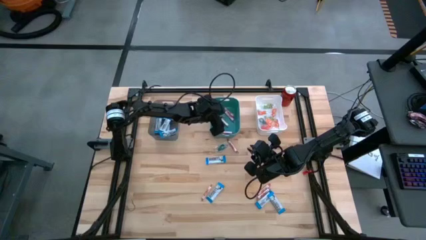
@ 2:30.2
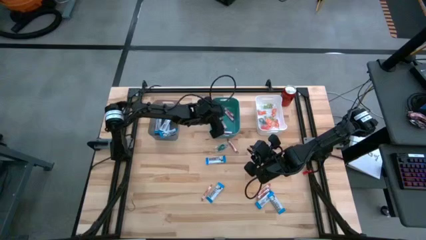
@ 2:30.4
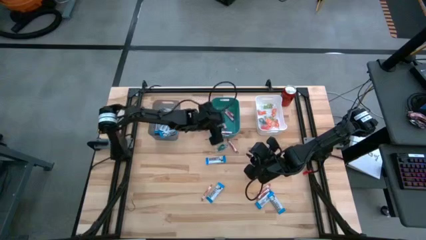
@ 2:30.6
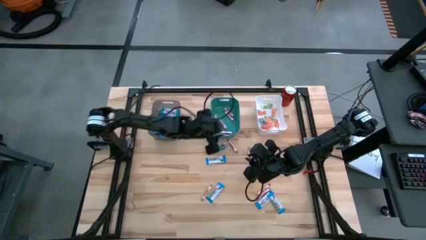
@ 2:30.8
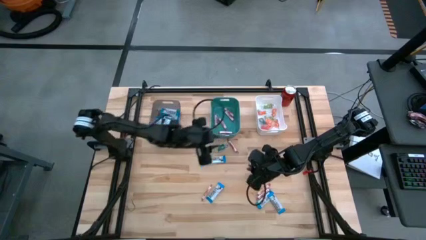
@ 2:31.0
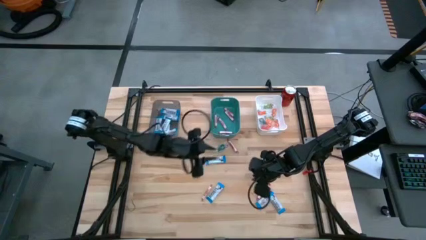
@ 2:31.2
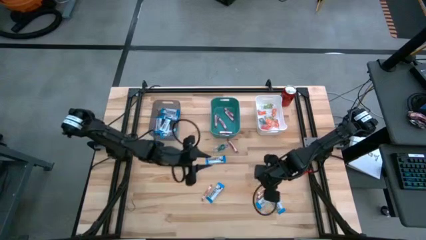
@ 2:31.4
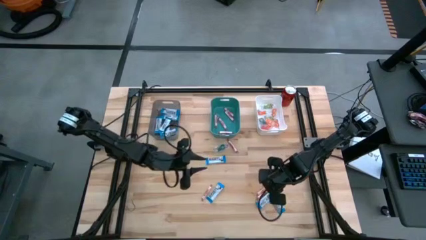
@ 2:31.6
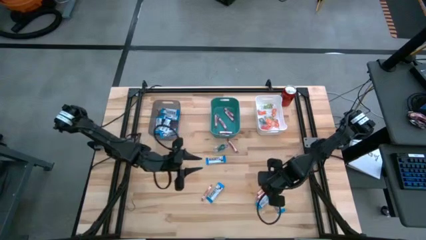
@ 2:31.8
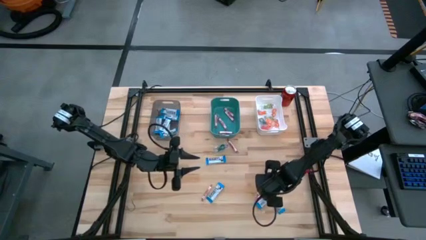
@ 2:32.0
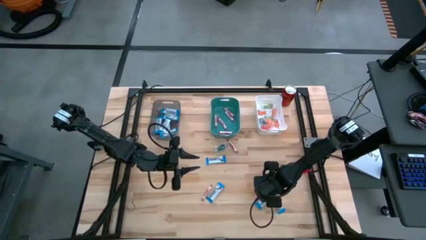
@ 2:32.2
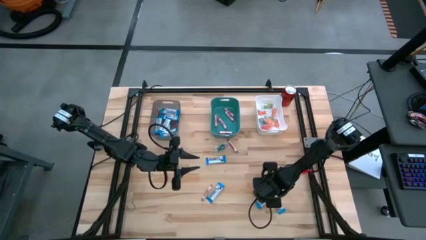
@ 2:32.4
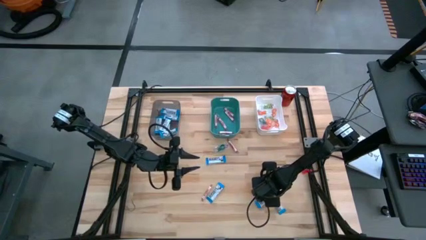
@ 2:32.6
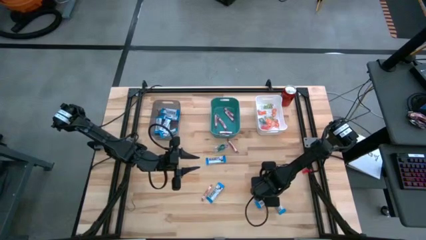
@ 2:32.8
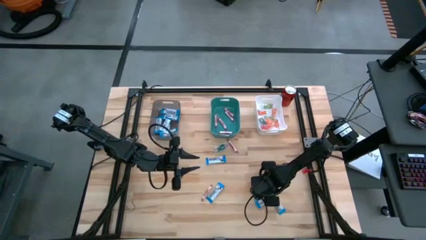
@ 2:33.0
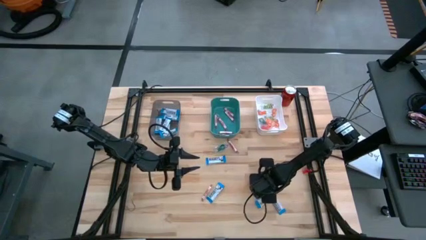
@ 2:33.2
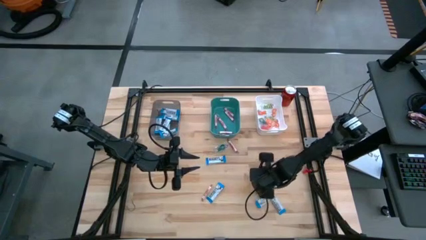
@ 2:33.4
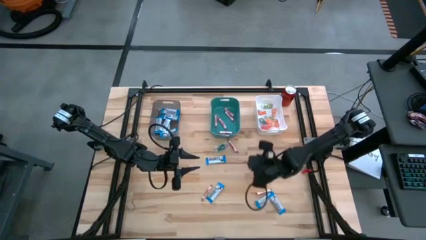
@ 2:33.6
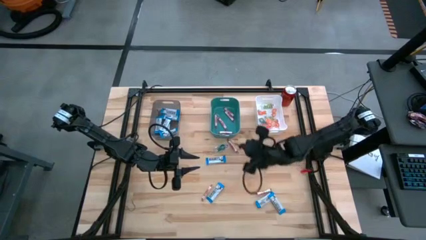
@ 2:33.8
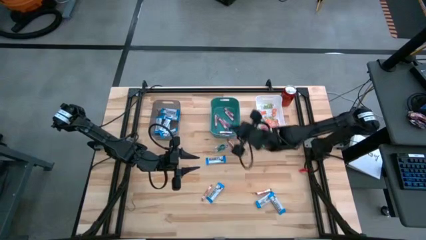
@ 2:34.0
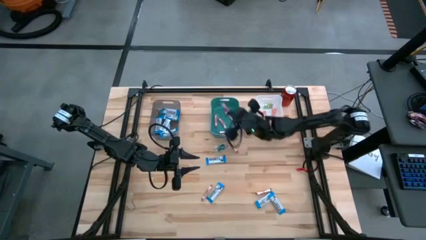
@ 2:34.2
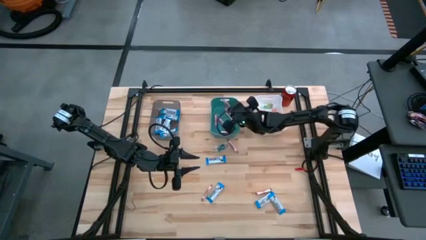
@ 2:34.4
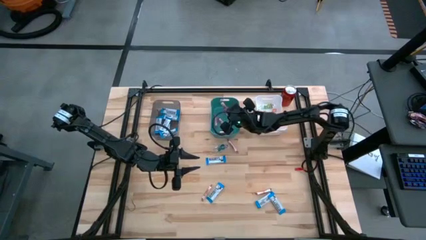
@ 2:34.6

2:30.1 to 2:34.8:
Task: Sort candy
Put the red candy into the blue bin

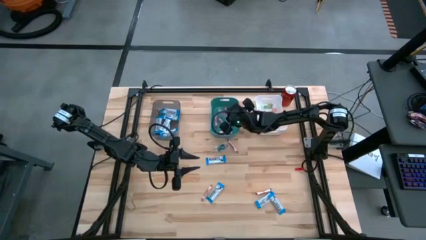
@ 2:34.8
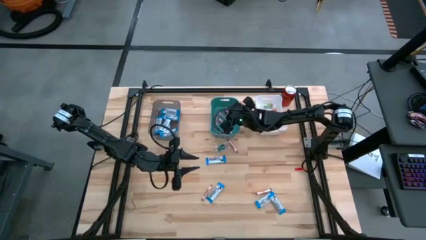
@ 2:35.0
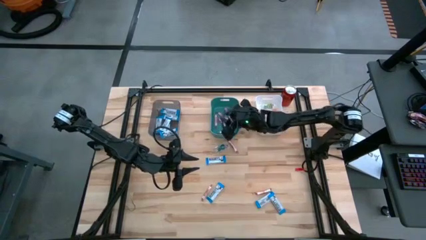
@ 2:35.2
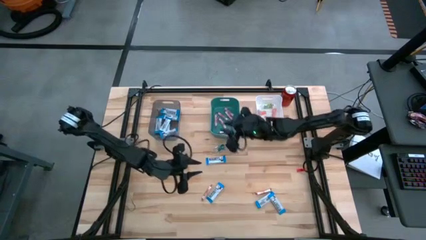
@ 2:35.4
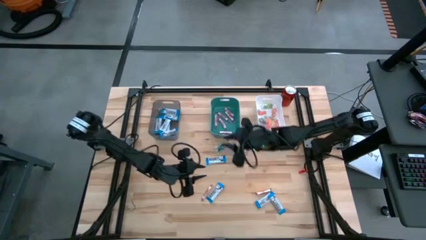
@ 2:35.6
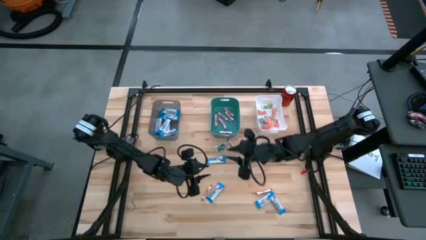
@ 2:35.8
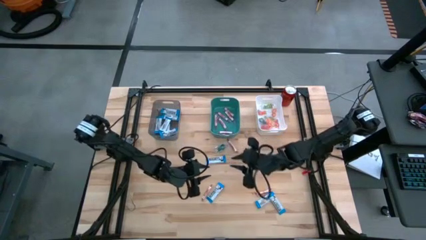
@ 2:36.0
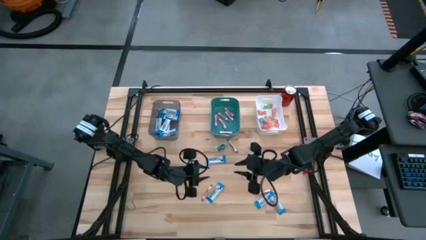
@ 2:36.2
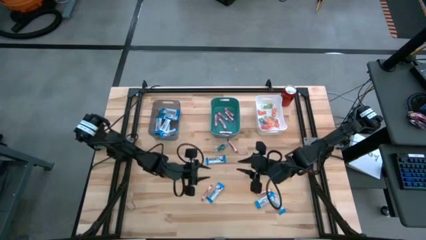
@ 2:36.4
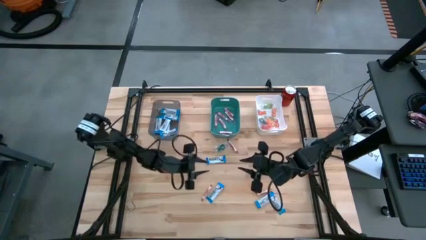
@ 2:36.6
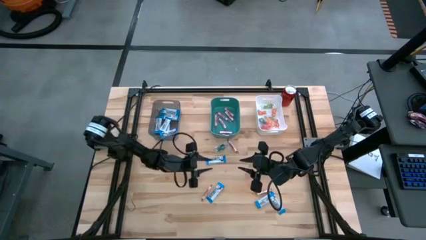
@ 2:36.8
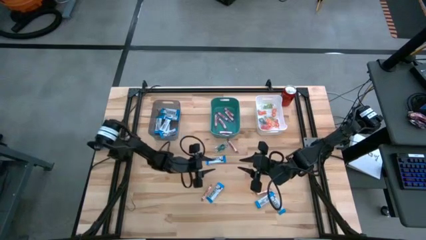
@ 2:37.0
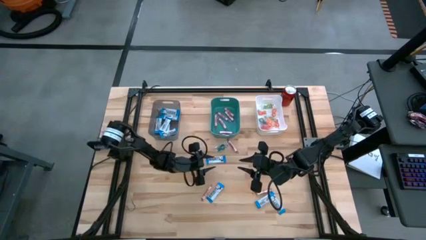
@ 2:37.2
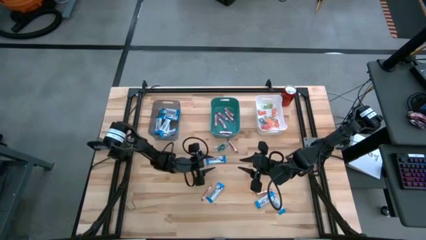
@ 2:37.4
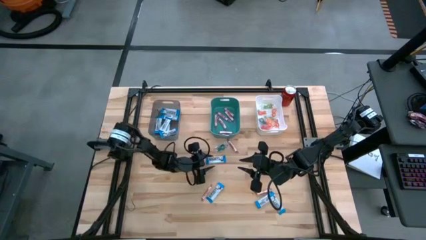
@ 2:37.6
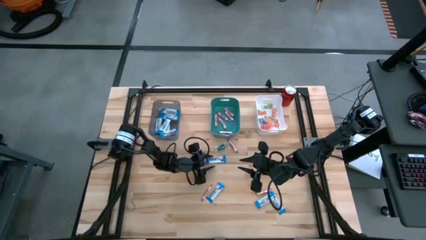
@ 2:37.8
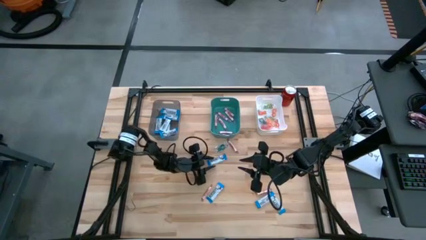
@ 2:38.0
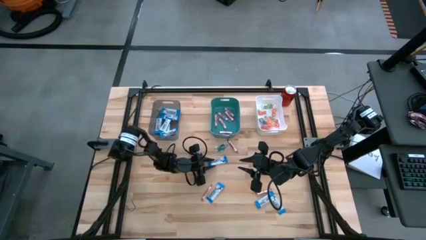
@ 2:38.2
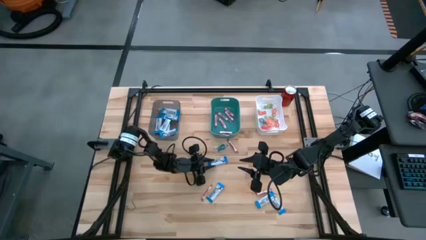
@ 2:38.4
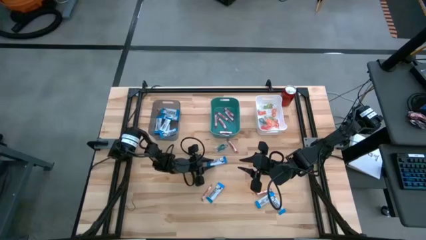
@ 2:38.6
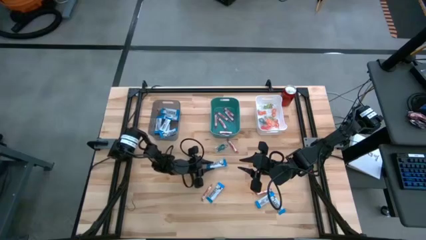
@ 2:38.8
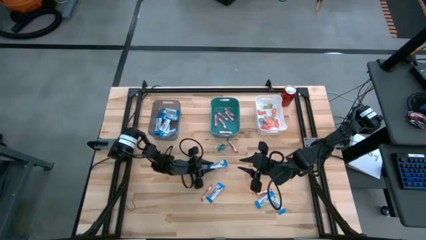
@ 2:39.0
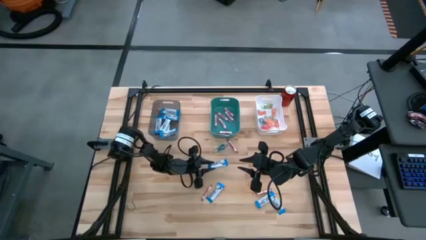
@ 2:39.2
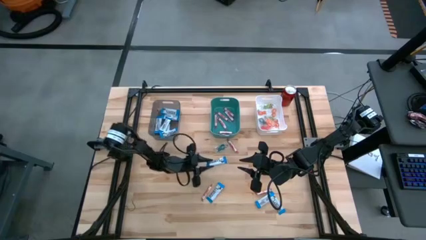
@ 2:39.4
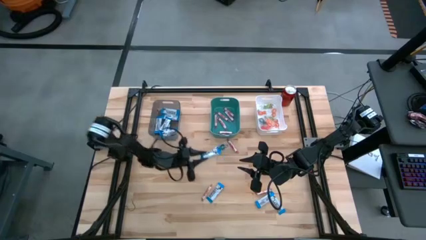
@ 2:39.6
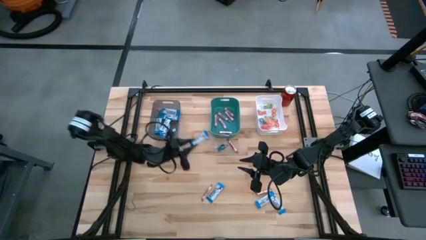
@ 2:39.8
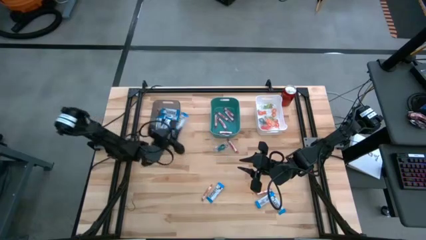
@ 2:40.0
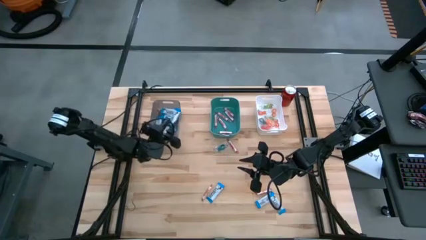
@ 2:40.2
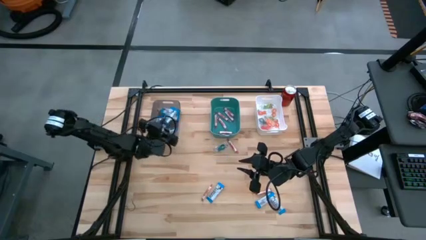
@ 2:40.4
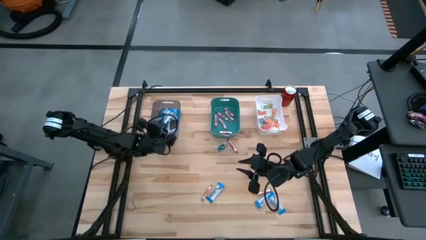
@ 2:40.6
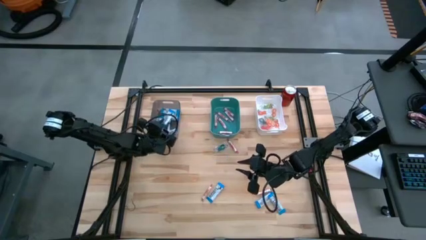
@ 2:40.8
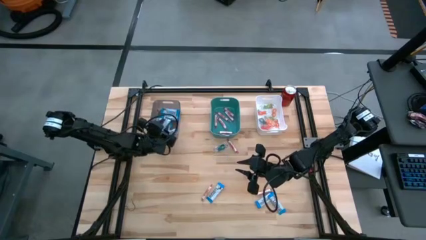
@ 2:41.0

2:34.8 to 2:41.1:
Put the white chocolate into the black bin

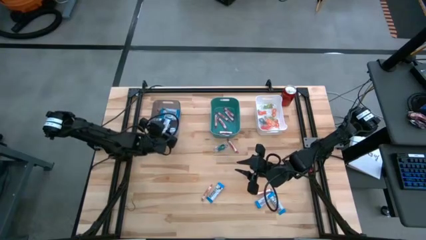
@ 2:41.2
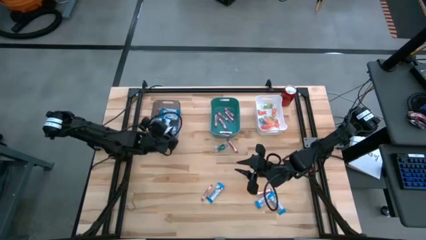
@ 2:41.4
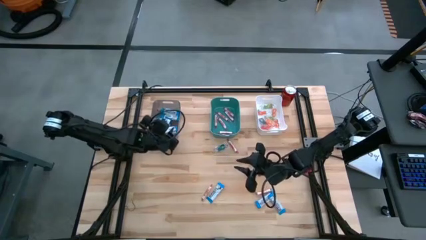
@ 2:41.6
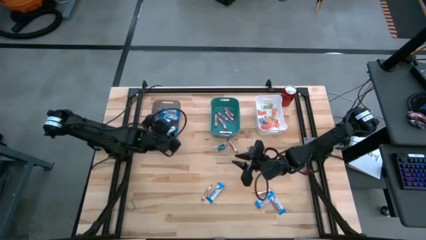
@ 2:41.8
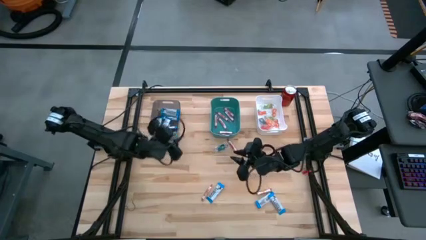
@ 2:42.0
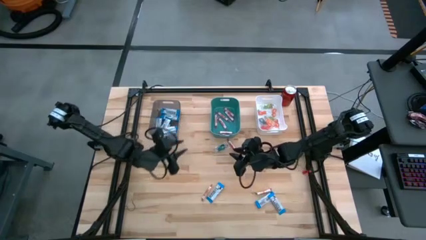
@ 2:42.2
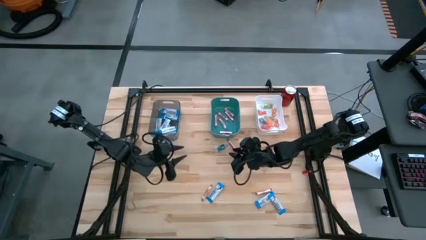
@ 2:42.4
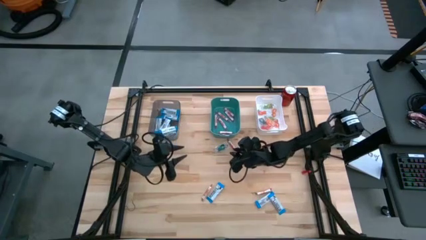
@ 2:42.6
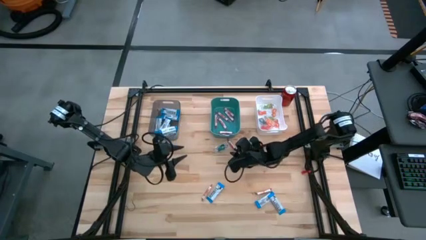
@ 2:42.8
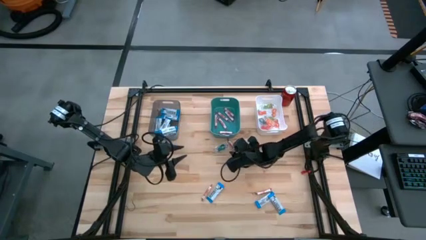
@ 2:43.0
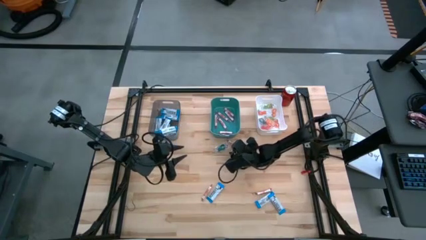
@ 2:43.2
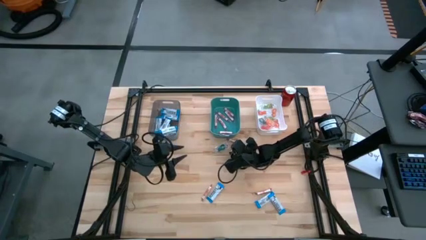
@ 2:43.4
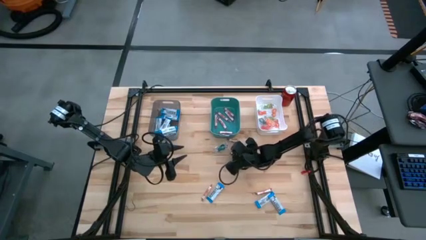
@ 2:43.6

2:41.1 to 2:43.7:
Put the red candy into the blue bin

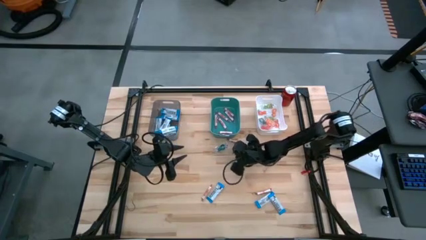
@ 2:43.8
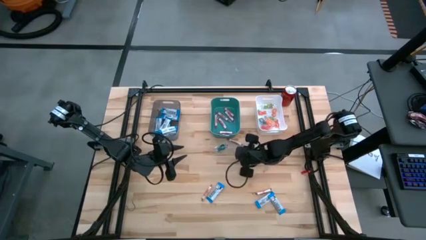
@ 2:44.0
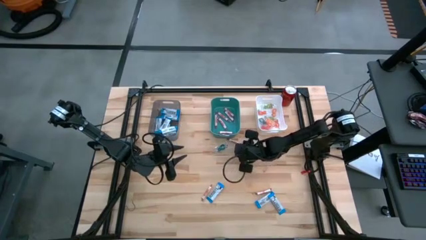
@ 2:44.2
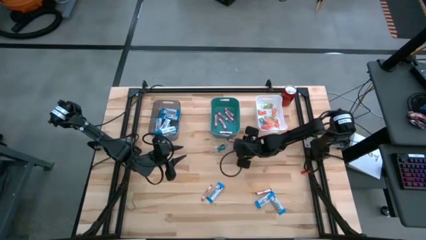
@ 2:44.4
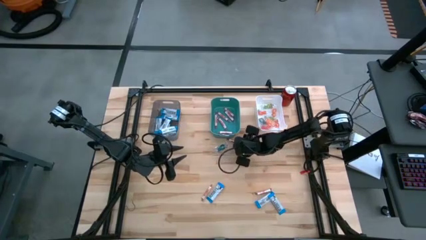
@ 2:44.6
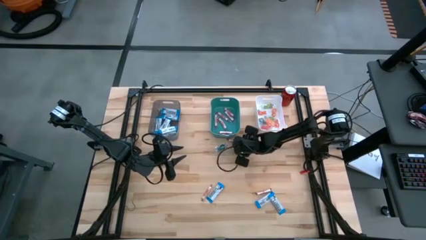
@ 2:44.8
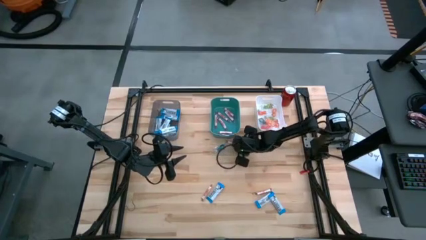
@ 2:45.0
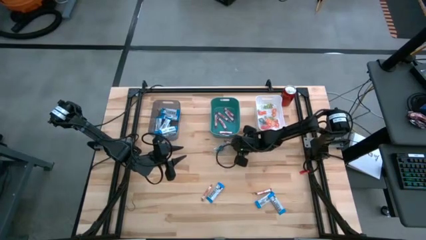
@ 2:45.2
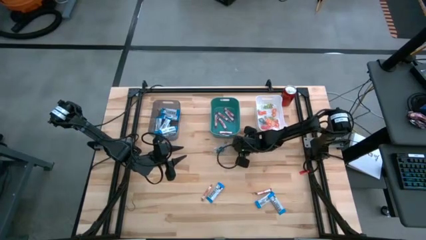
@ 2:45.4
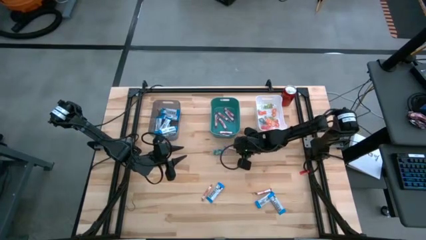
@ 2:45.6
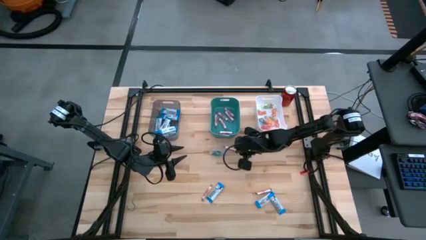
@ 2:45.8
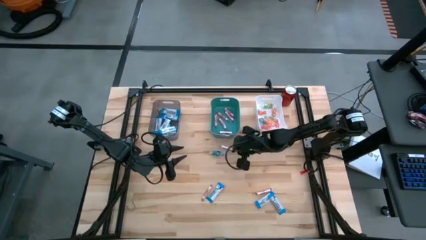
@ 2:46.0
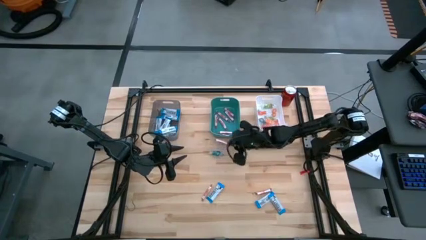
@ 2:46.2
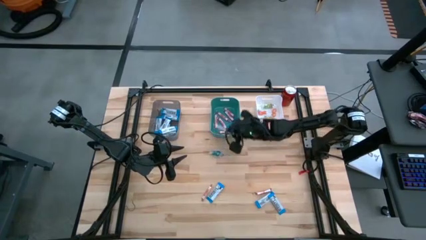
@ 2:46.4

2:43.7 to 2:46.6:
Put the red candy into the blue bin
